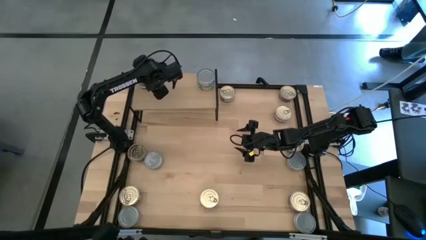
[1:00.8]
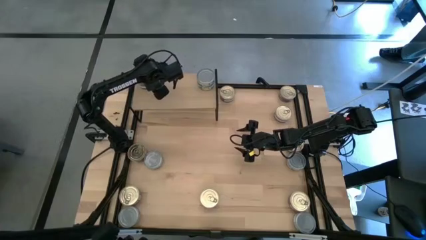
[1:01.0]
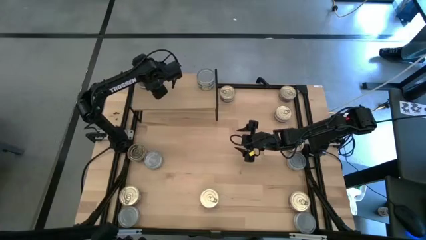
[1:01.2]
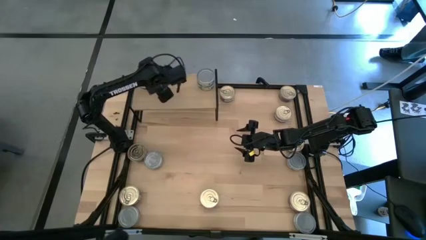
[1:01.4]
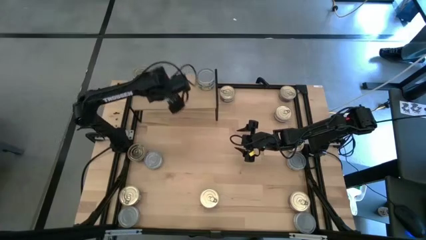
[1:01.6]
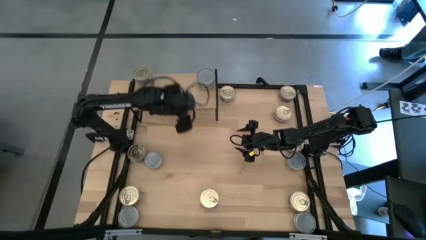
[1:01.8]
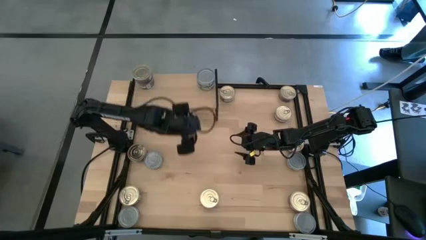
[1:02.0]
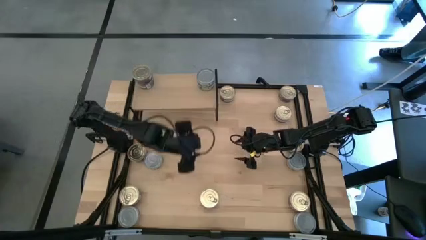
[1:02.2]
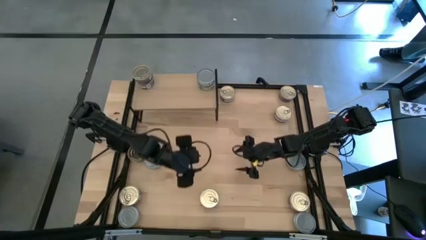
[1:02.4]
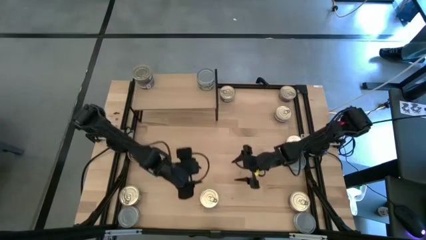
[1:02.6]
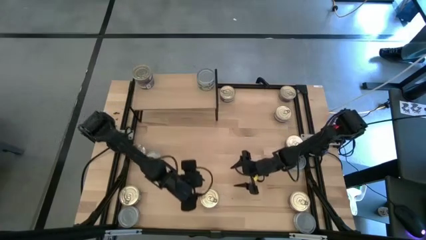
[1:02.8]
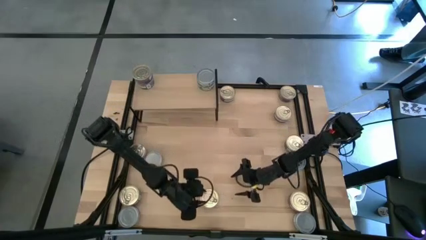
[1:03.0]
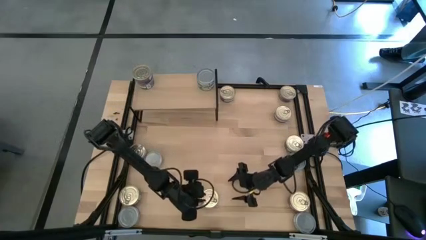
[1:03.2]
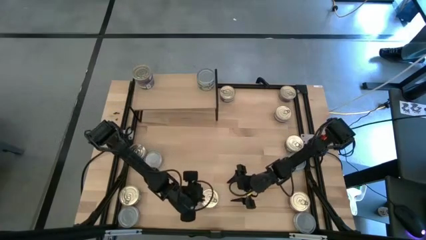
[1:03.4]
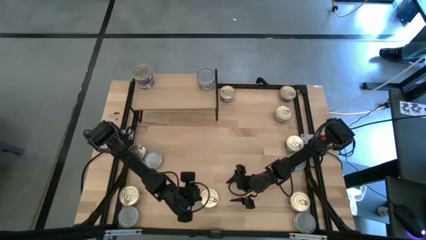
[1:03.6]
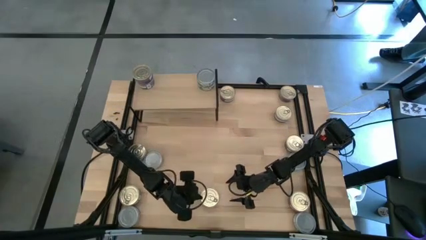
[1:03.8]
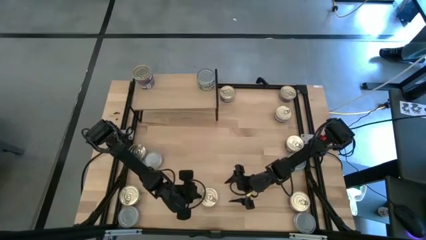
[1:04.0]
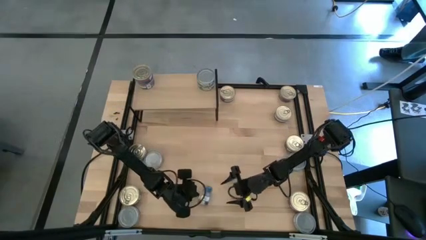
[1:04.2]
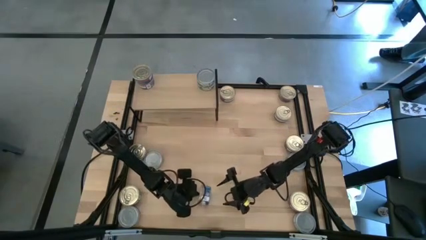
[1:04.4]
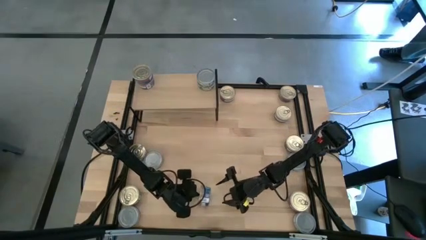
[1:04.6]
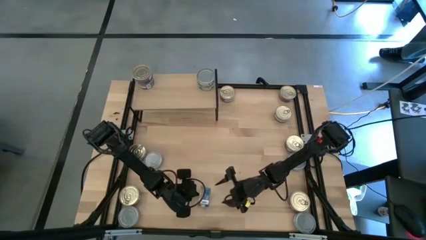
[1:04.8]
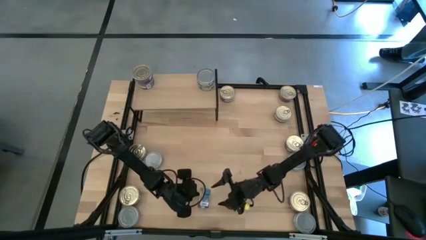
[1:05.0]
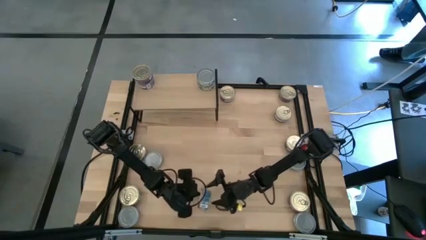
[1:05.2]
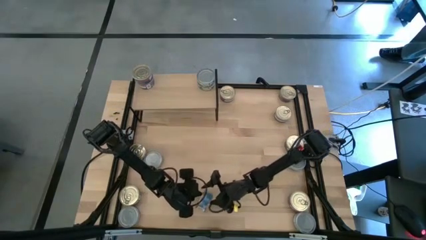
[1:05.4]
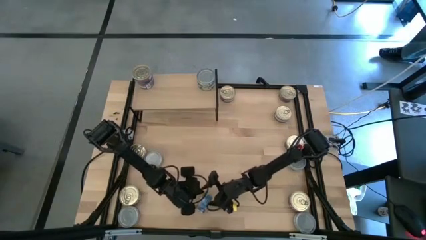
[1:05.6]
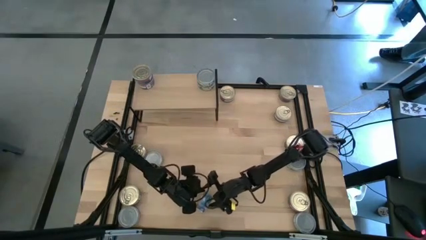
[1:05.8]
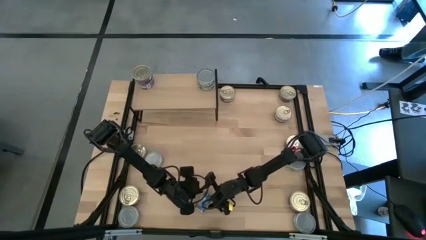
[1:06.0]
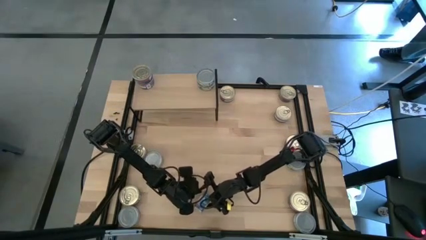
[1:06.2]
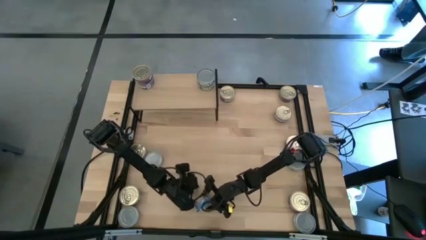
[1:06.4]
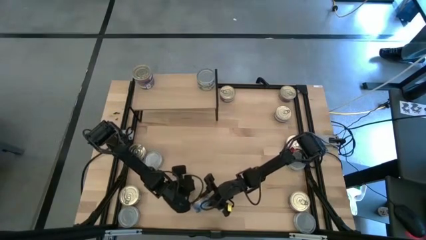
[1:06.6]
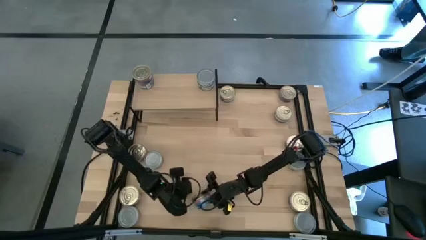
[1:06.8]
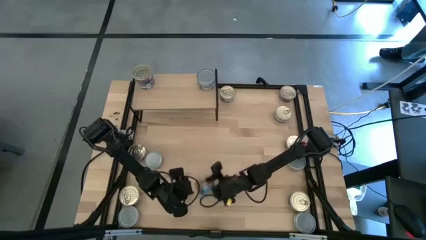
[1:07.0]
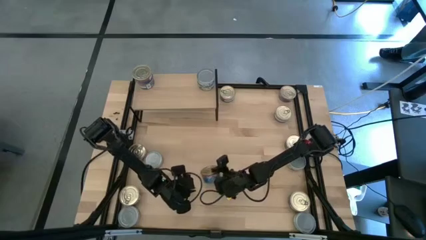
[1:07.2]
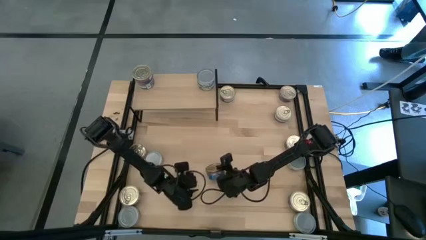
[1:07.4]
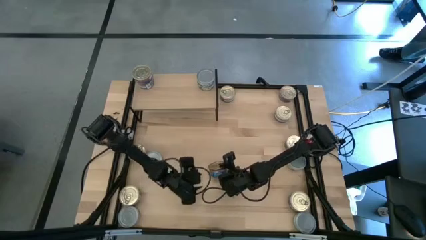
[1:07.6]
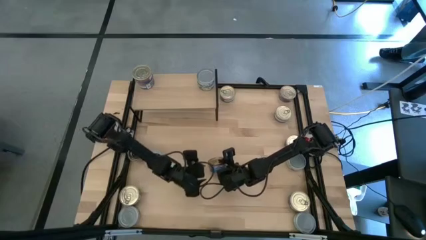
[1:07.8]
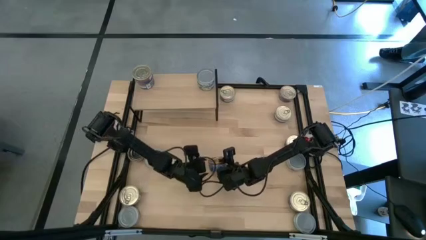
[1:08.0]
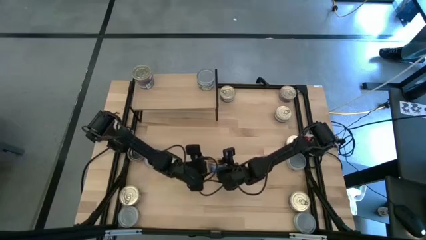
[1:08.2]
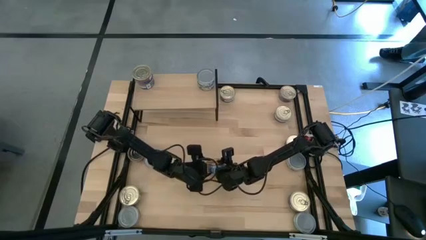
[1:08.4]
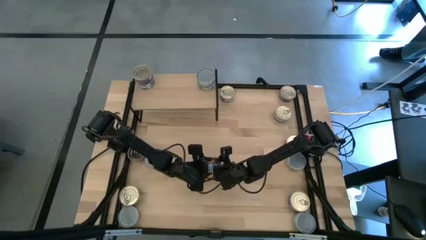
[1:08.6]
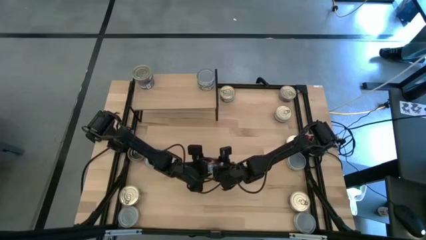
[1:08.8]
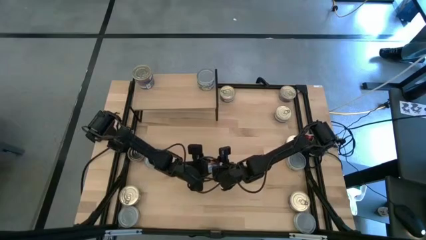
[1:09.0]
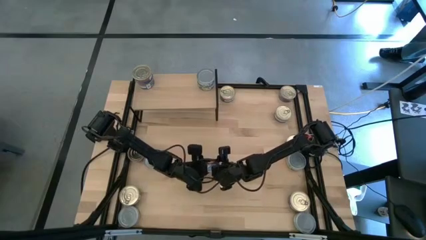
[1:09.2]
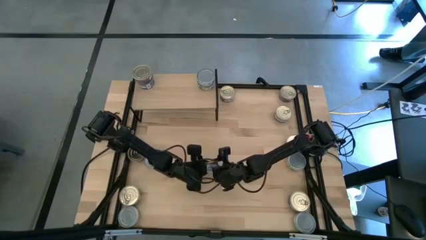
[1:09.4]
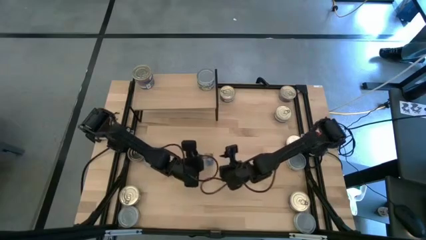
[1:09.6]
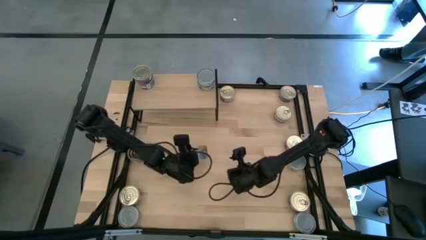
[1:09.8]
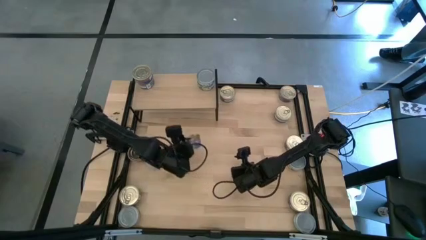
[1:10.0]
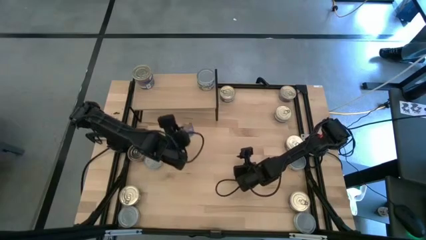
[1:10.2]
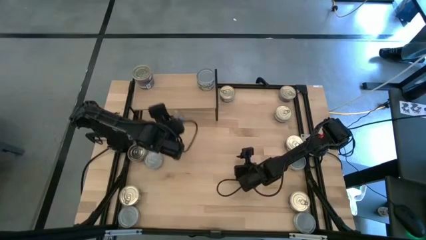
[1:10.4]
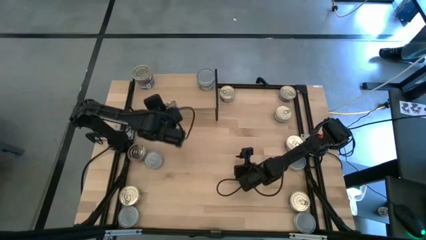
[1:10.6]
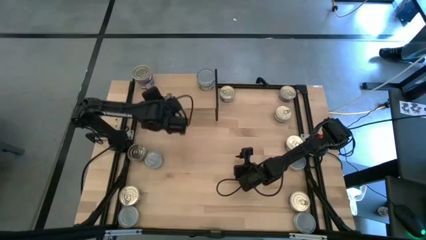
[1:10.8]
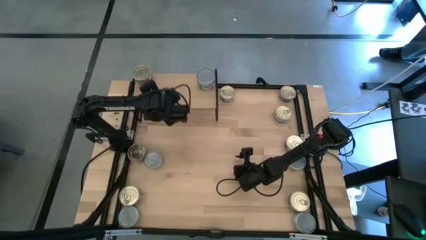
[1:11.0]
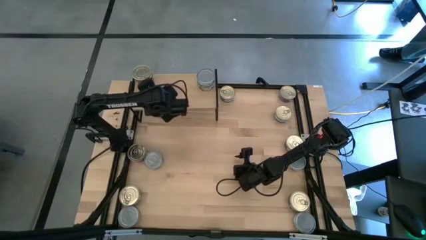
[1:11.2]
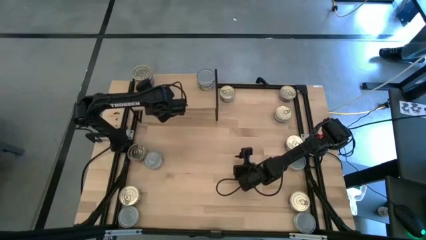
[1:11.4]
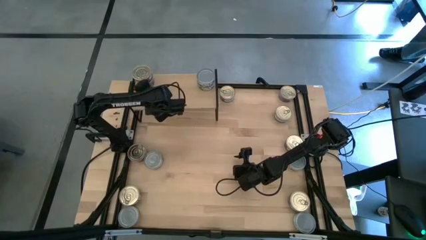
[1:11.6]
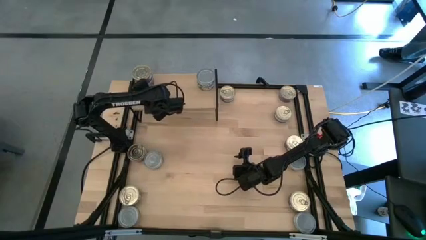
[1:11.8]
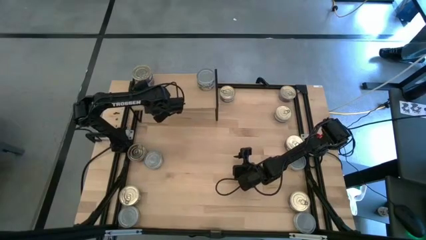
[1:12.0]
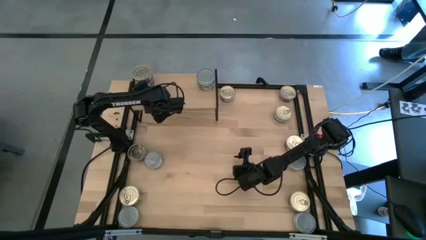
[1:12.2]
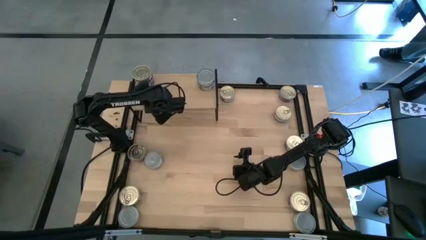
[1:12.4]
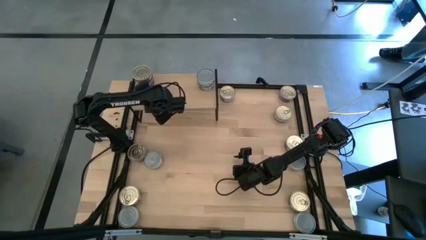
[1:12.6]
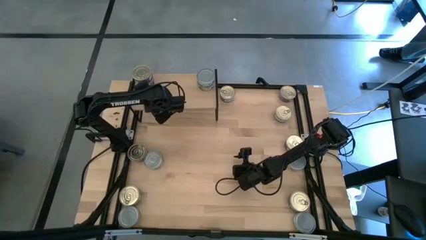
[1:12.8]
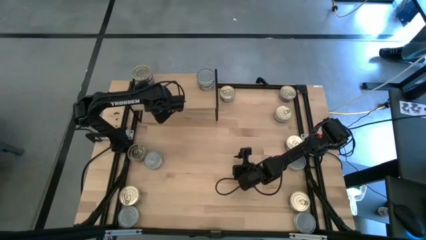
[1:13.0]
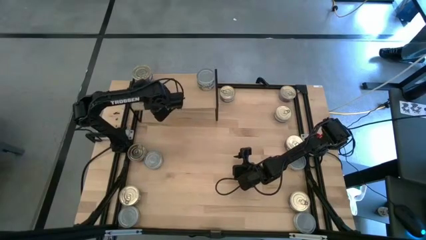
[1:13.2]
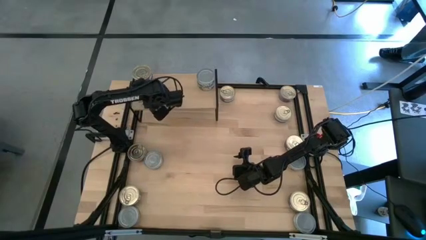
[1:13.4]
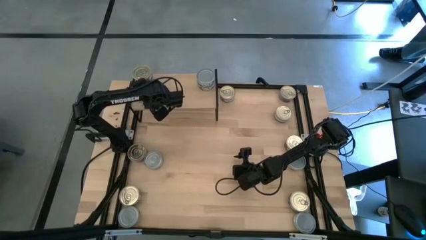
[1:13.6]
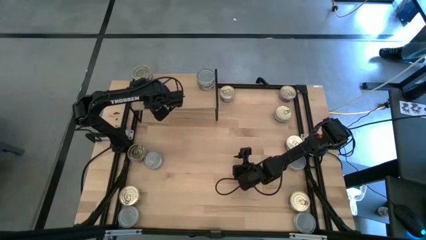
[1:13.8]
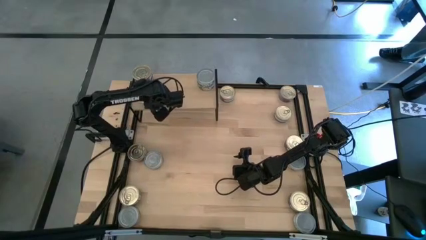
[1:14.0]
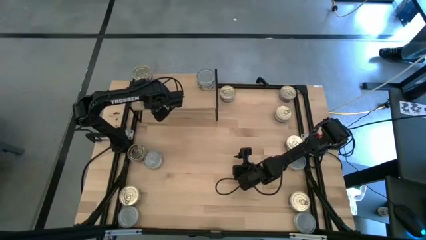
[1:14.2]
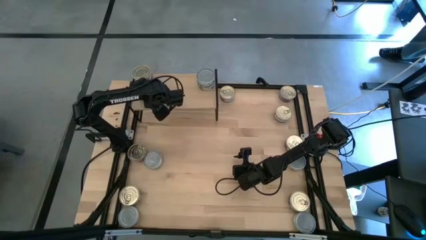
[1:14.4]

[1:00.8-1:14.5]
Task: Stack canned seafood by type on shelf
Put the blue tuna can on the shelf aligned with the other blue tuna can
